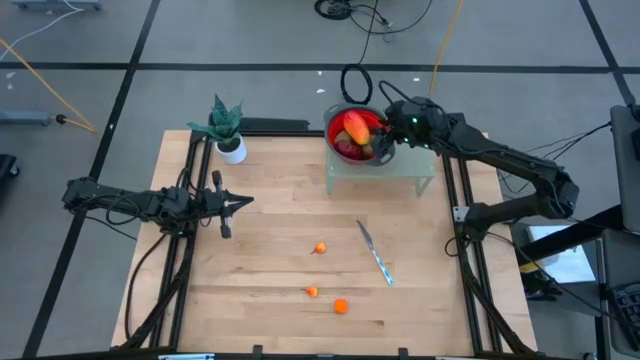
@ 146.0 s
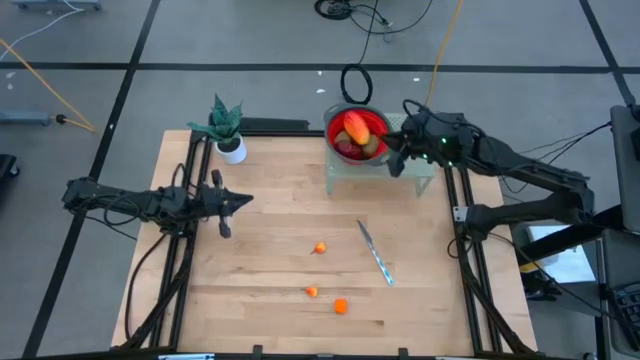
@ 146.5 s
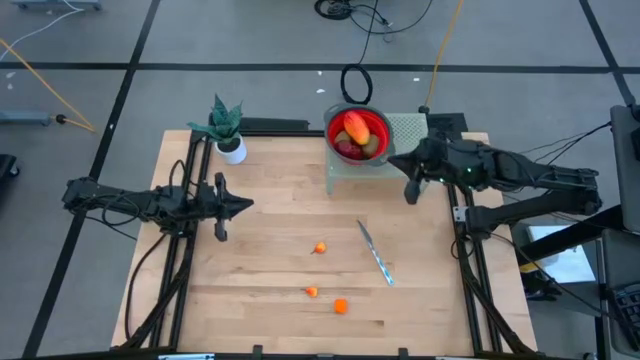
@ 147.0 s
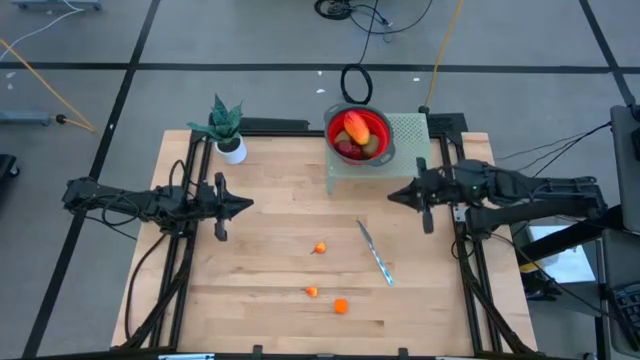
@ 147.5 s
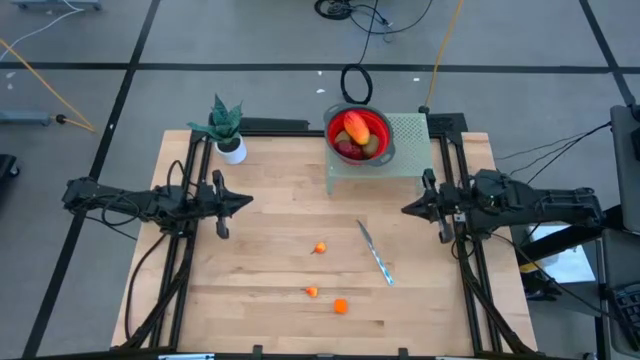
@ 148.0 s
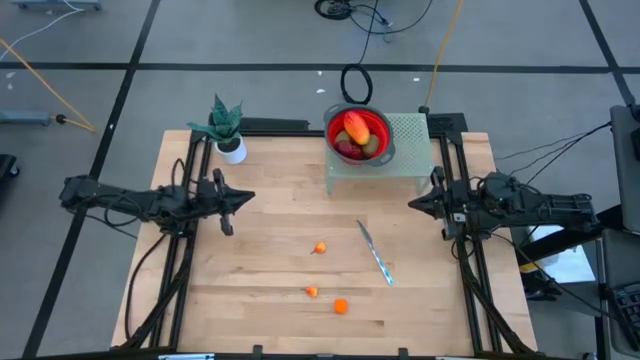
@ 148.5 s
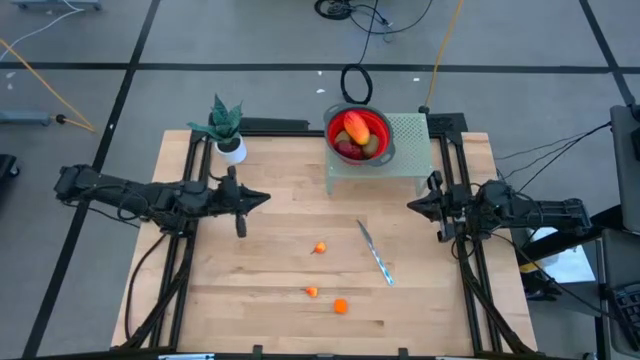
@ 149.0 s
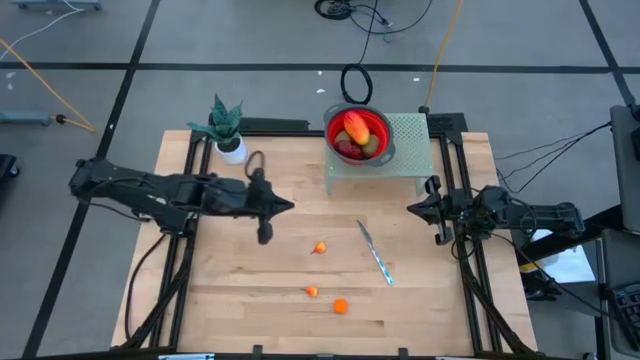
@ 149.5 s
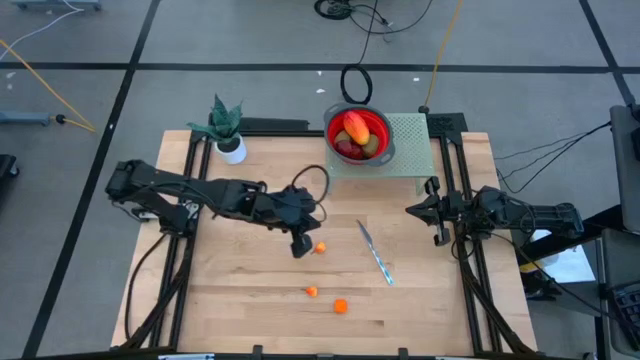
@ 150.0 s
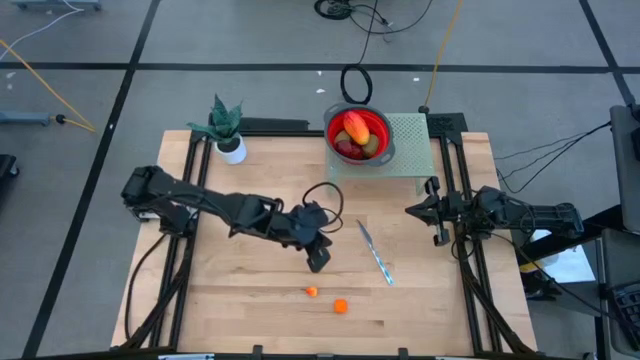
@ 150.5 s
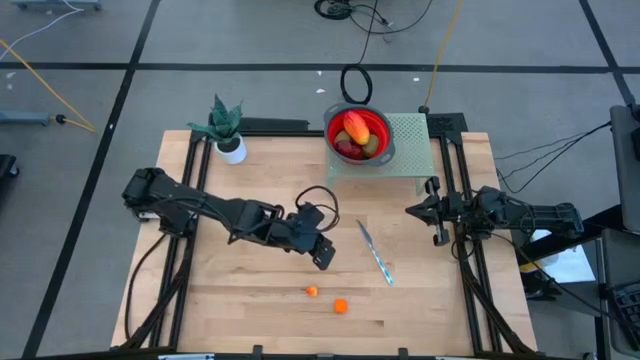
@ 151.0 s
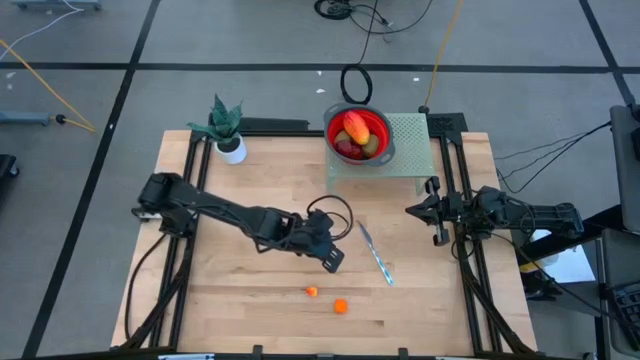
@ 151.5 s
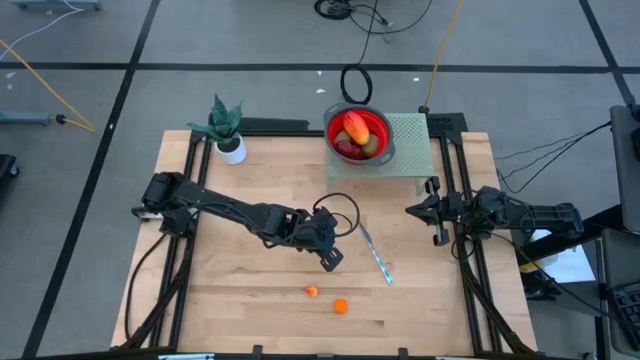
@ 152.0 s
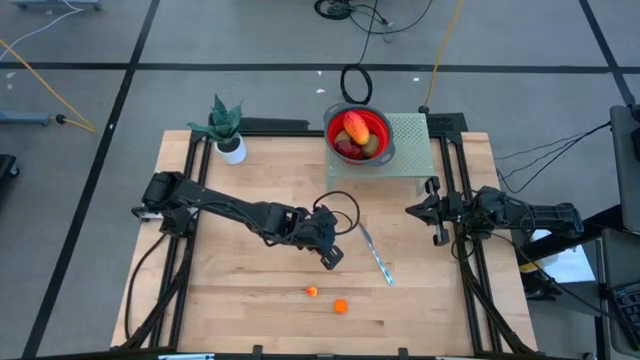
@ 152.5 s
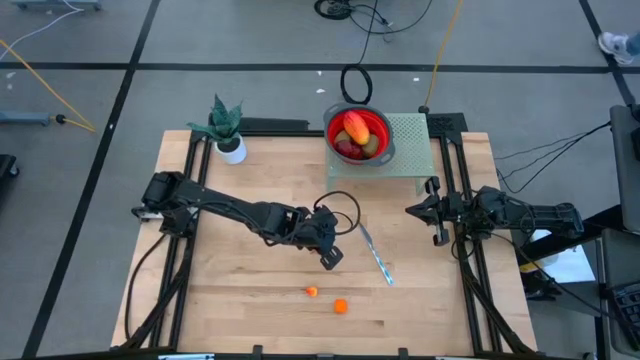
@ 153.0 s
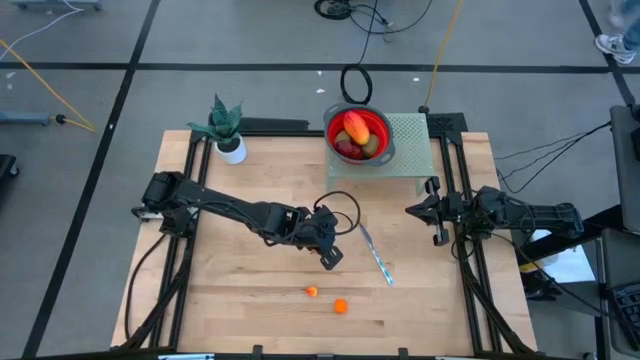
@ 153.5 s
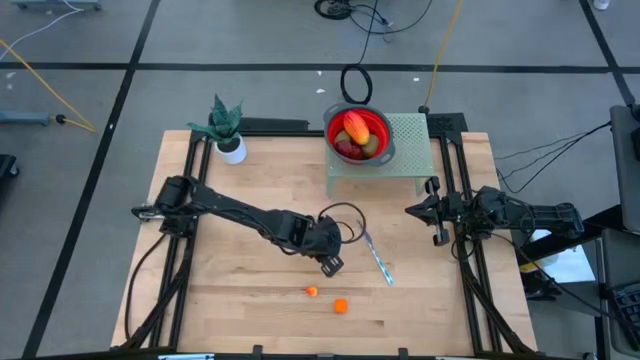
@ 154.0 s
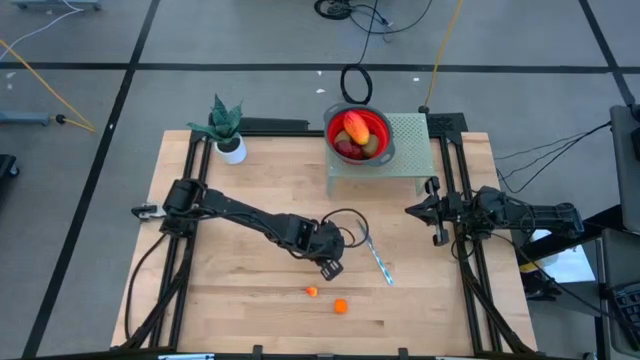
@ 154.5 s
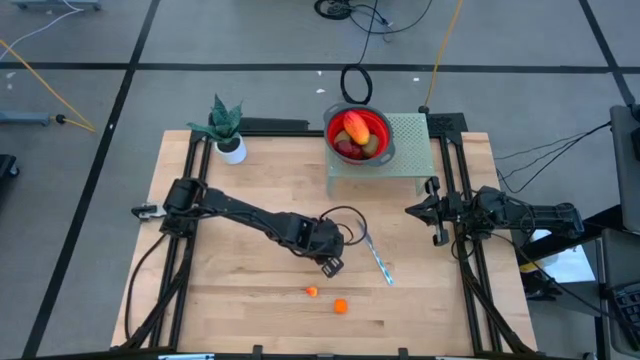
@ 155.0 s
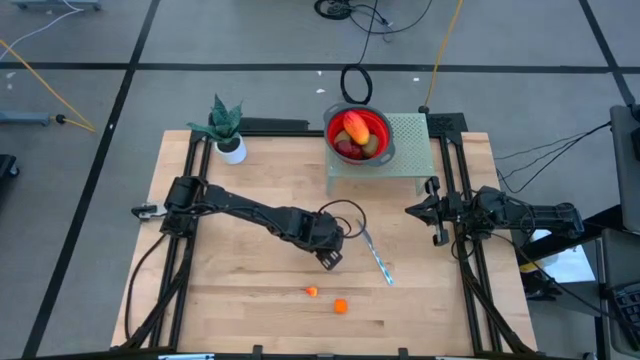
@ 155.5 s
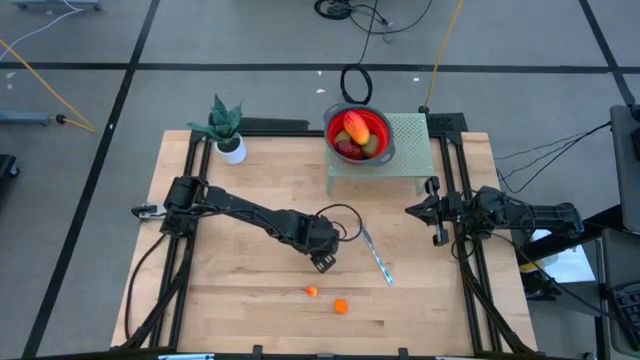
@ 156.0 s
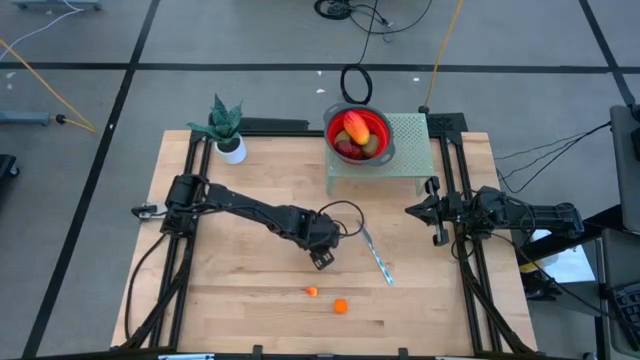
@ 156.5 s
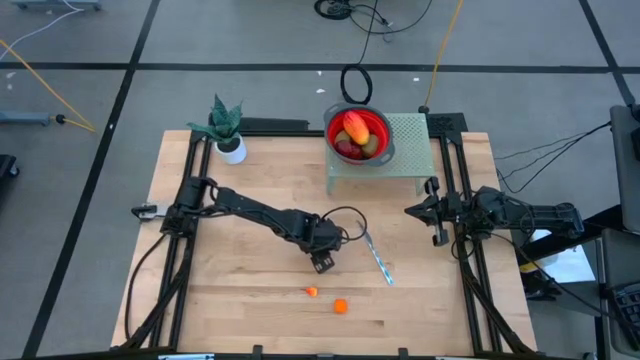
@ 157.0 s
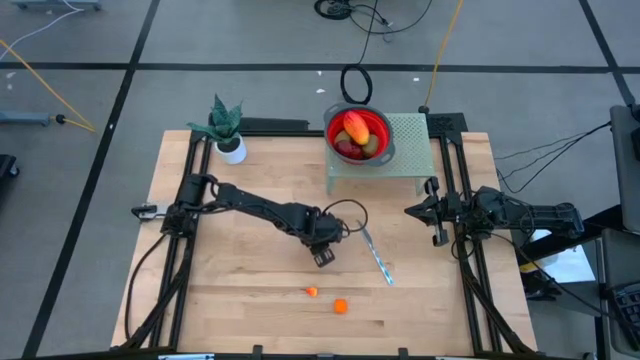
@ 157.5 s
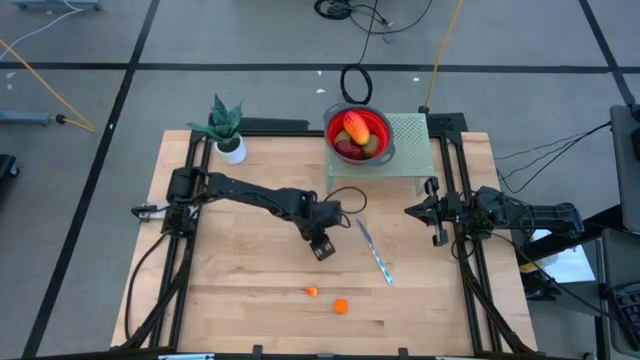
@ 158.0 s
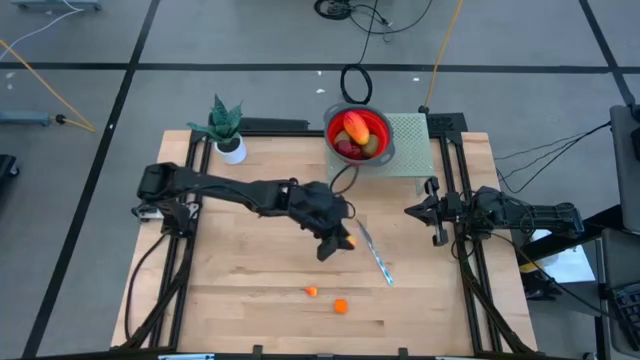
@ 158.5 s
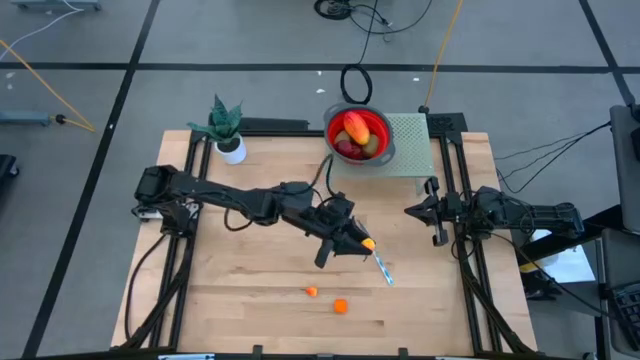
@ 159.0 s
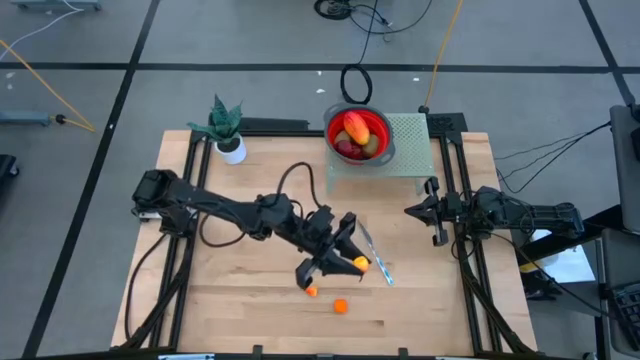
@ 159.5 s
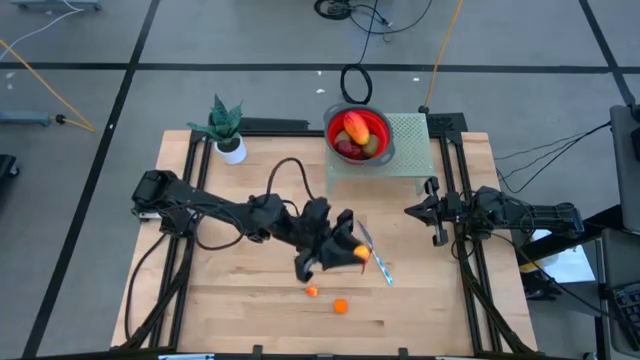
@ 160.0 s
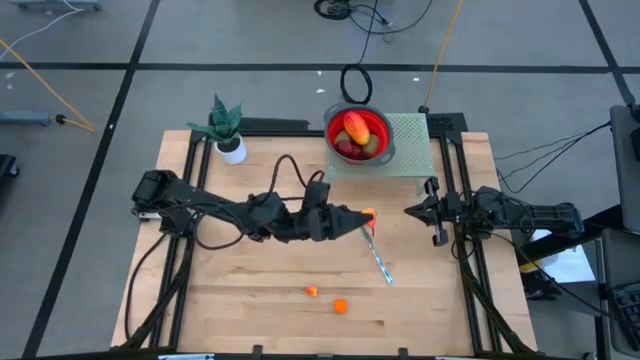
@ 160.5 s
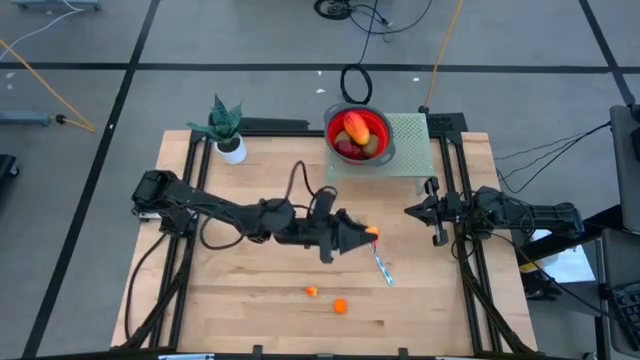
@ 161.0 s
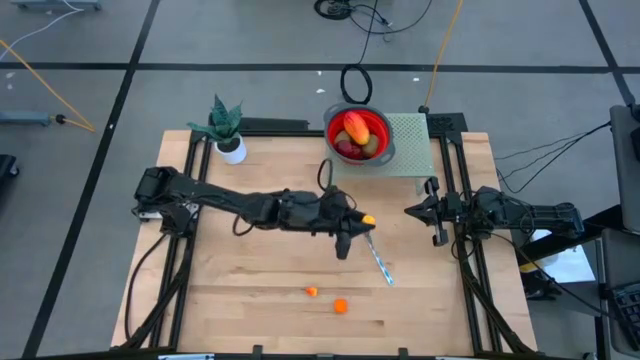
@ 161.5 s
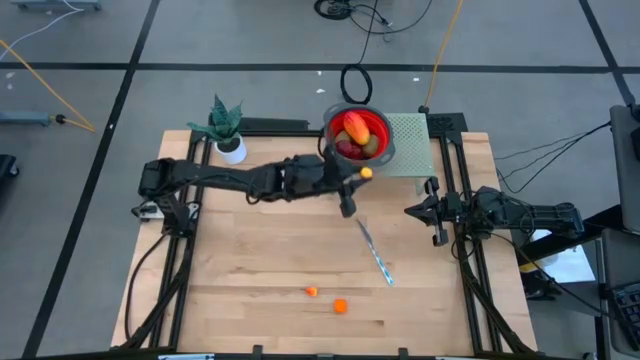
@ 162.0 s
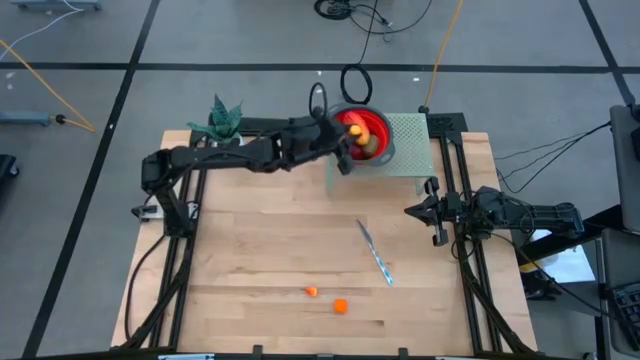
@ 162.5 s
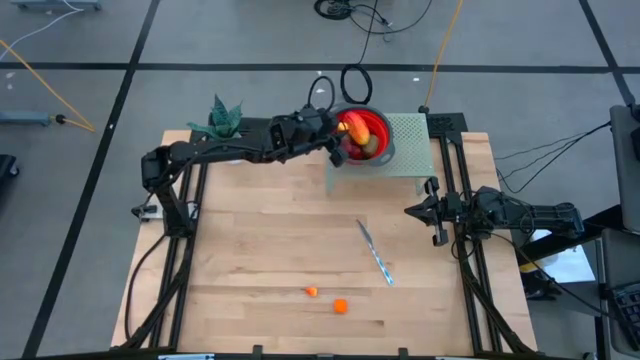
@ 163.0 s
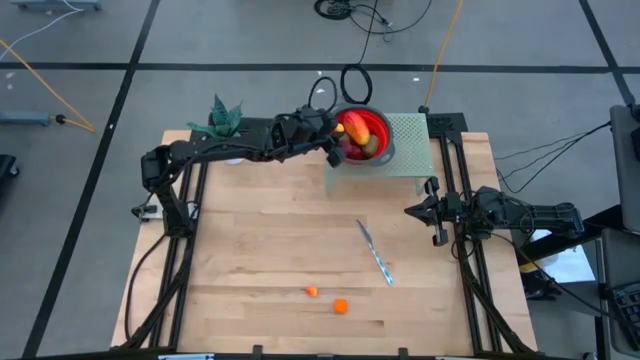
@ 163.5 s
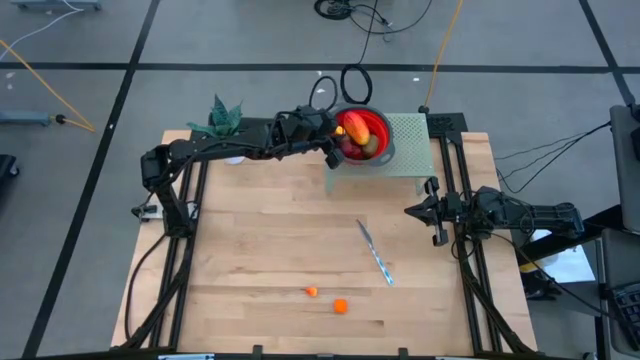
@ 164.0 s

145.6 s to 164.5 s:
Task: Pick & Place Fruit
Put the yellow orange peach into the red basket on the shelf

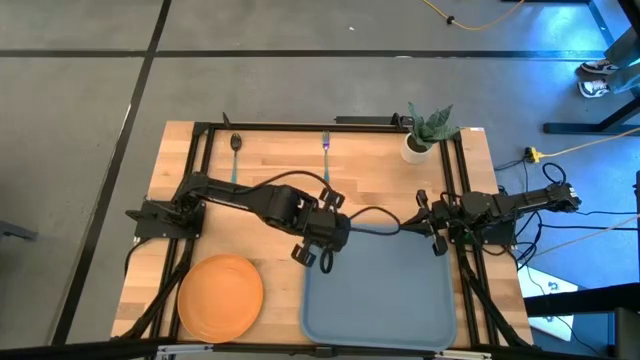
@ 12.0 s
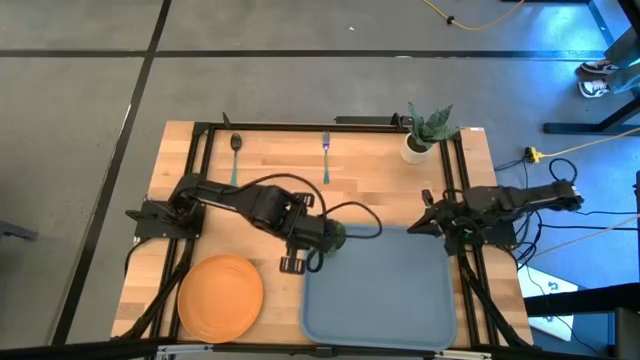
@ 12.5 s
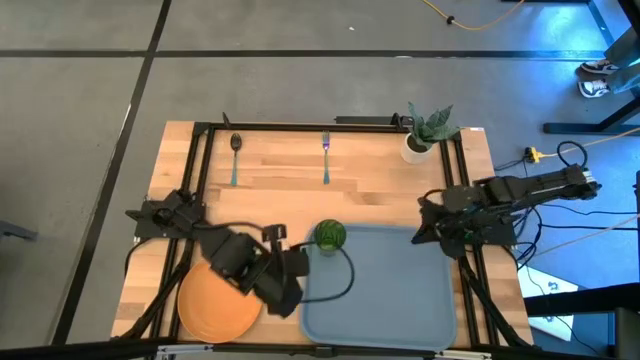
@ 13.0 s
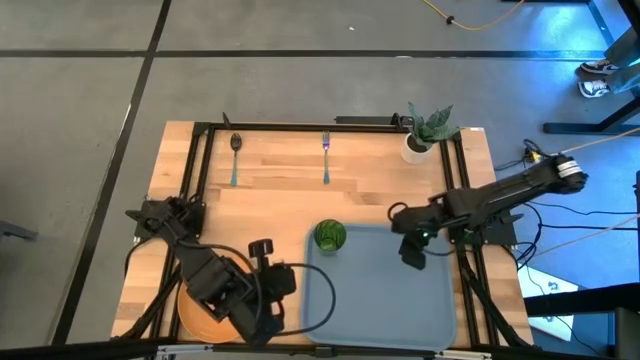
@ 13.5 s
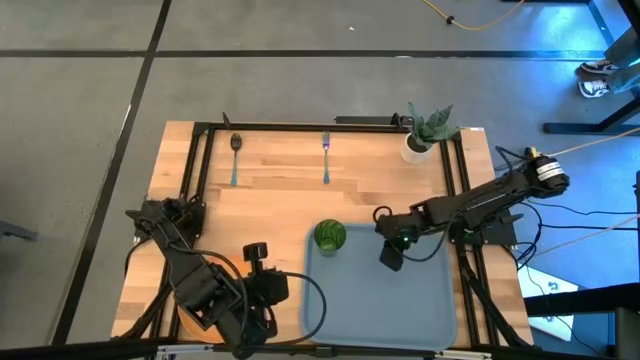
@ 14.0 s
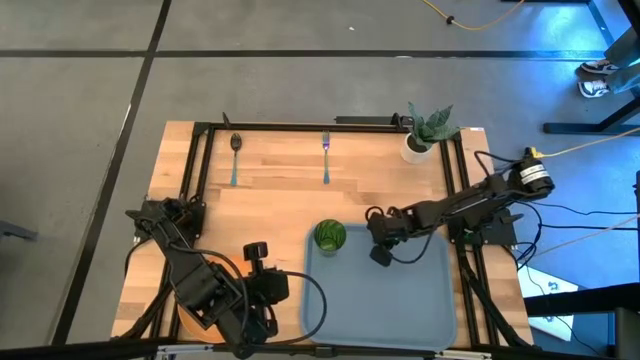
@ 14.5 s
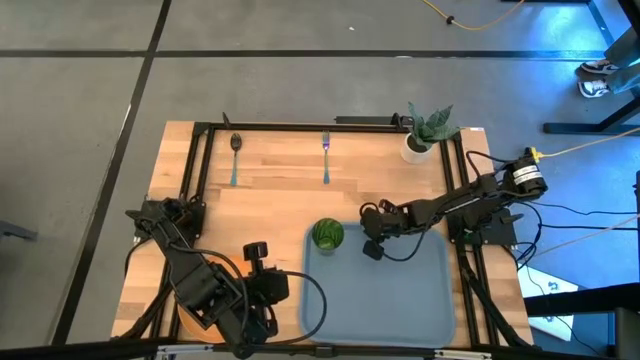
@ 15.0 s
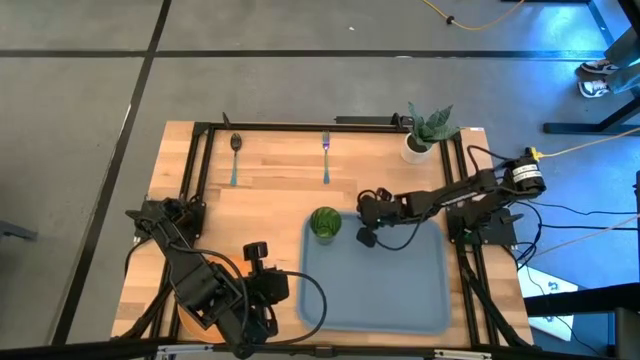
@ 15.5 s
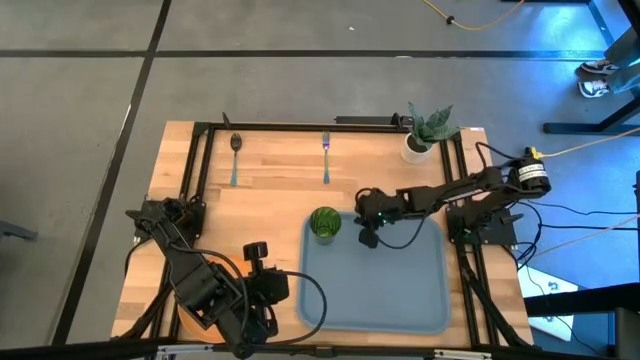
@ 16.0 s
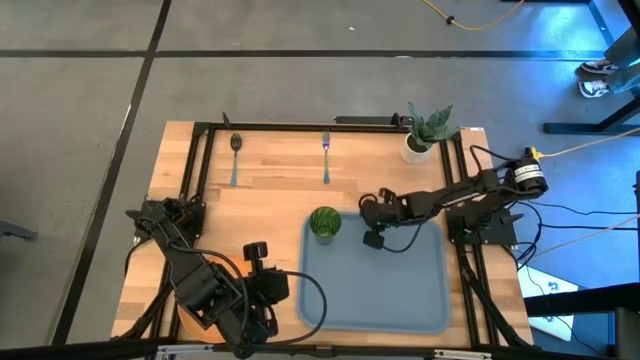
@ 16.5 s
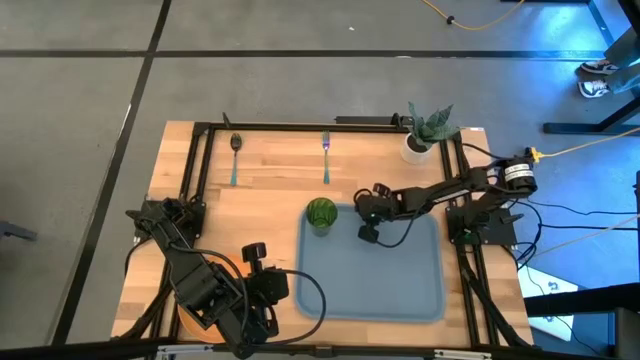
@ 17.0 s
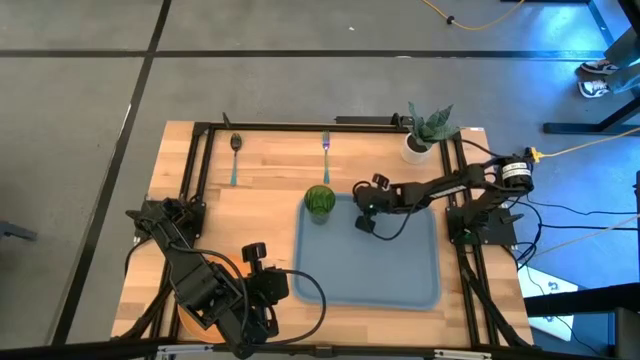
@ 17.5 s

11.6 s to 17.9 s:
Task: Pick and place plate/cup/fork/spoon on tray
Adjust the blue tray
